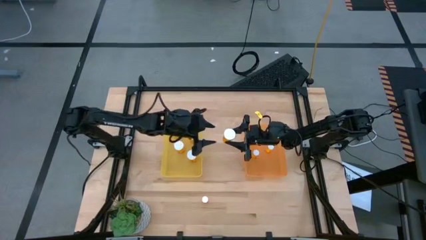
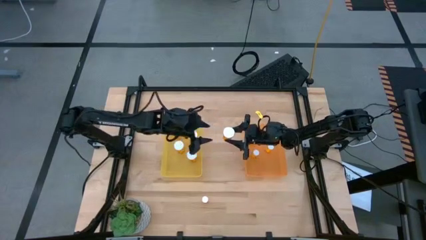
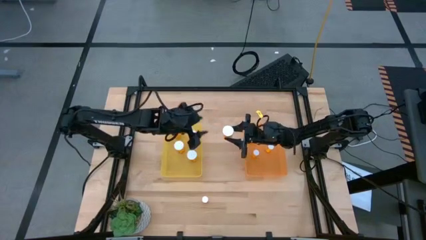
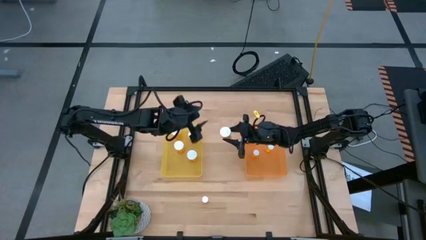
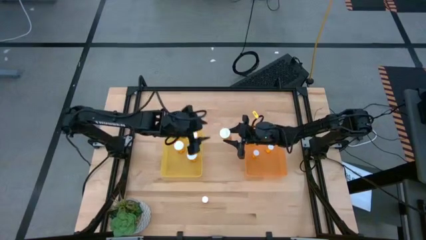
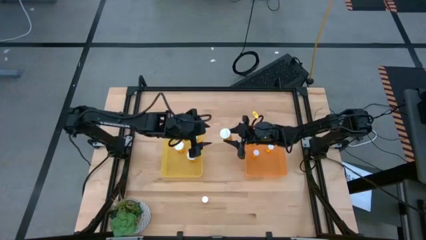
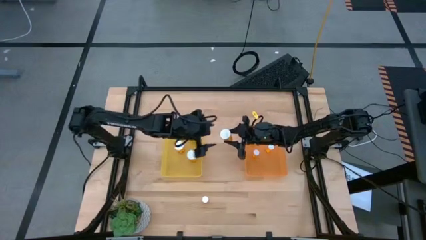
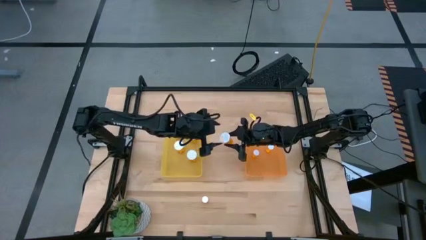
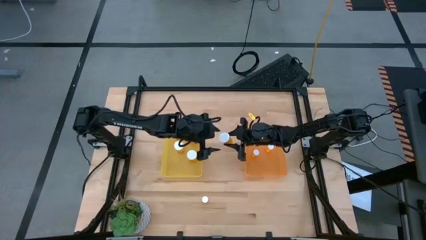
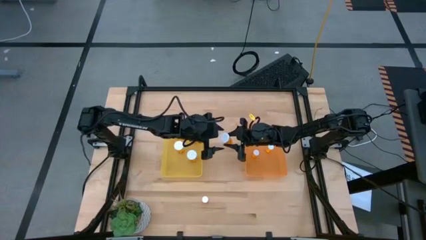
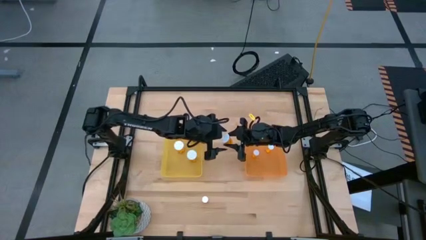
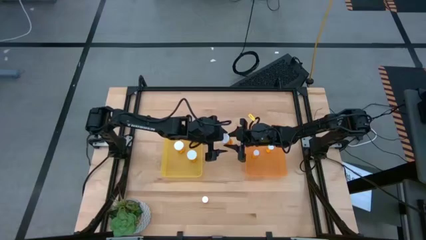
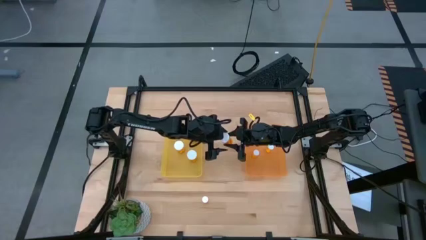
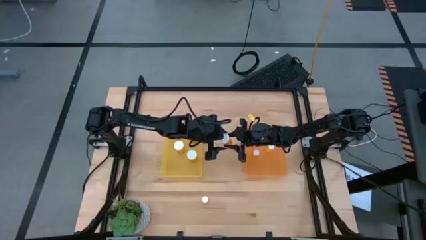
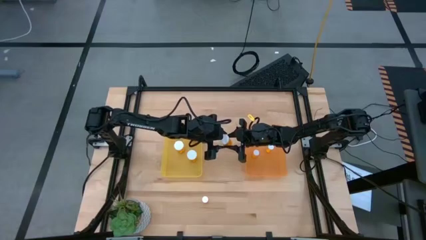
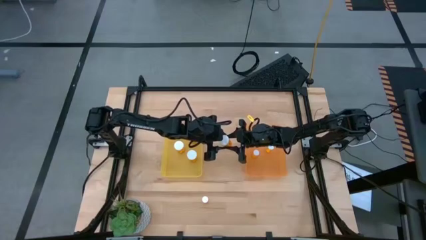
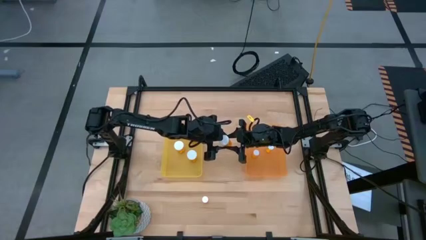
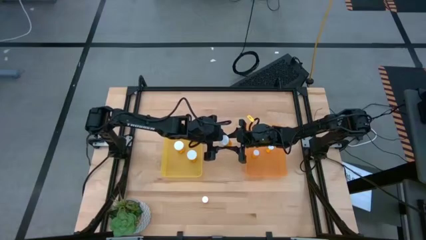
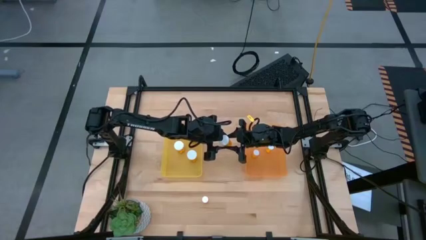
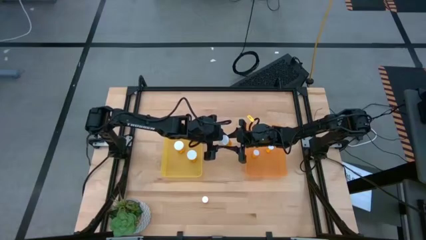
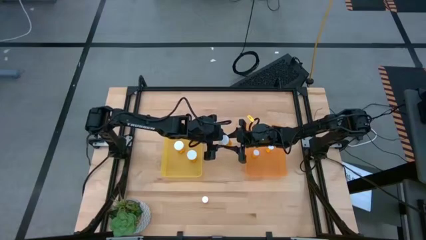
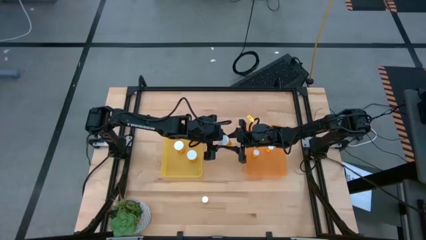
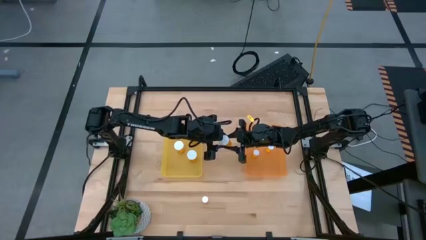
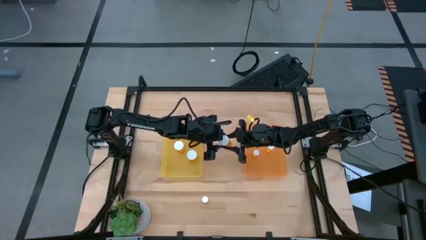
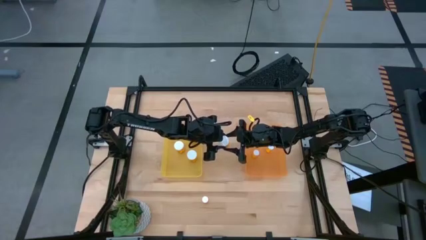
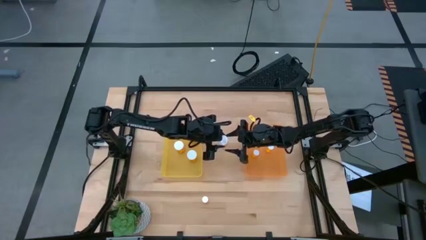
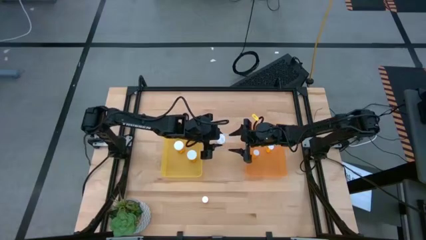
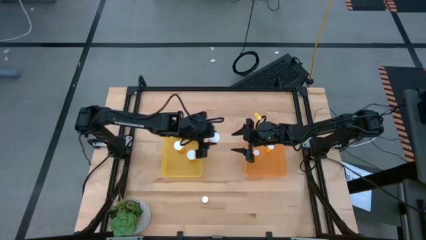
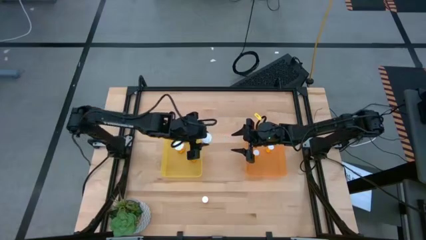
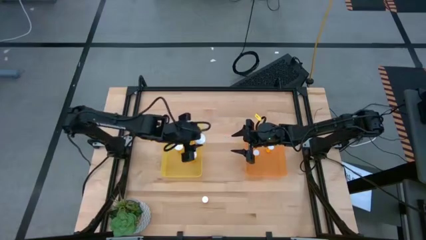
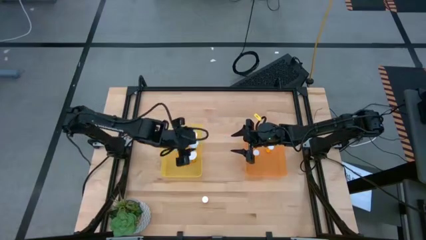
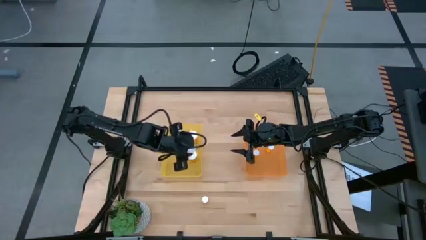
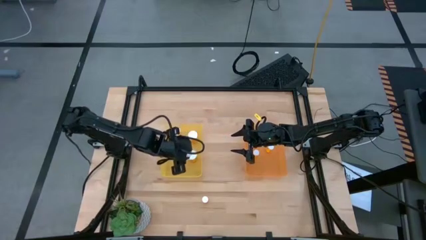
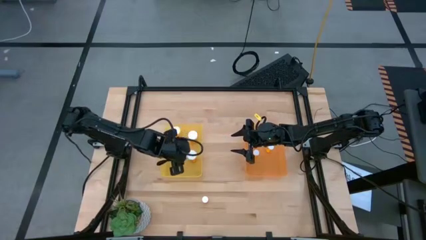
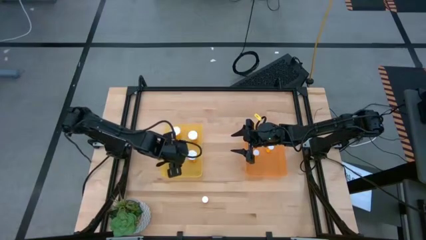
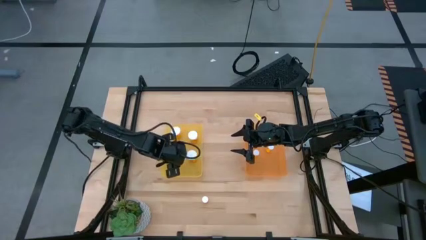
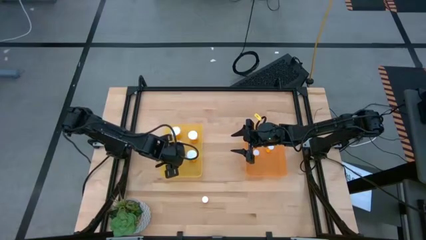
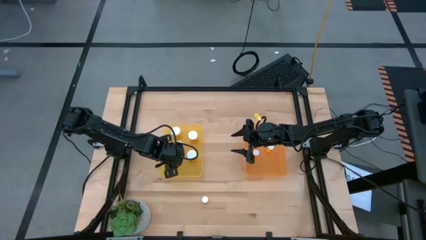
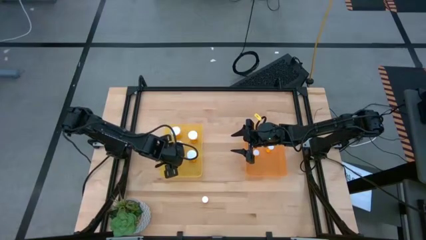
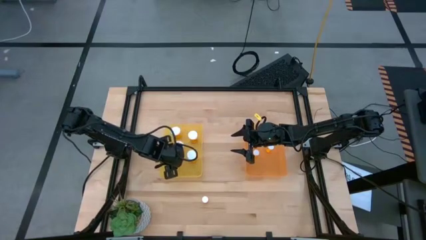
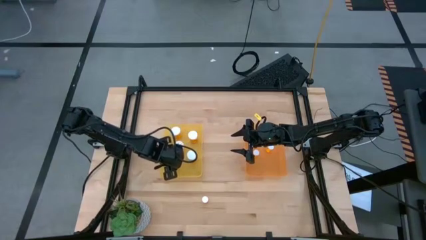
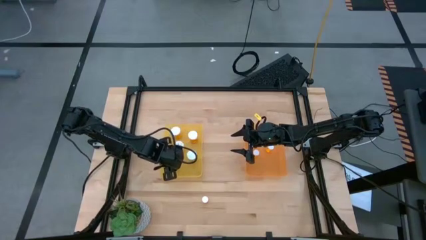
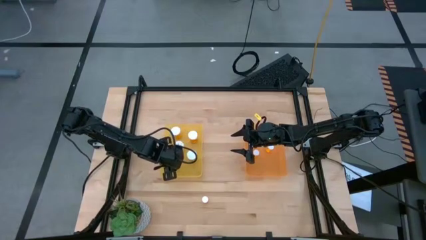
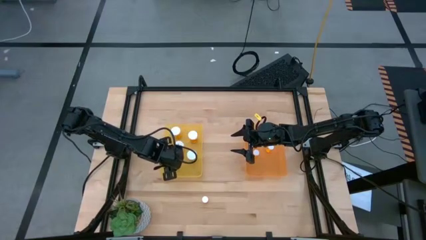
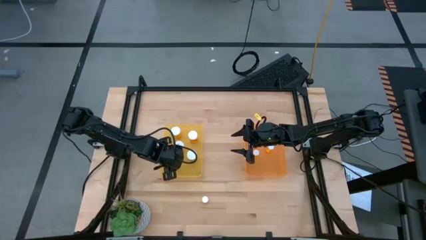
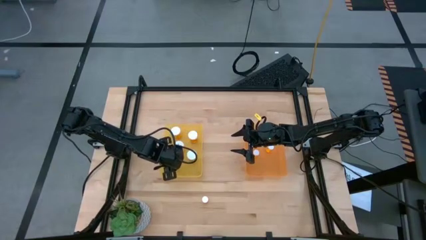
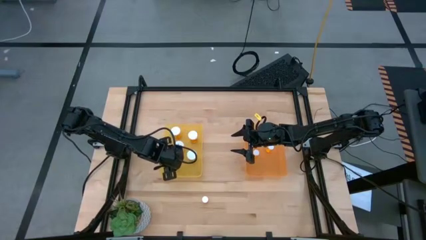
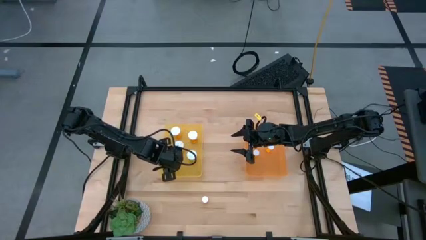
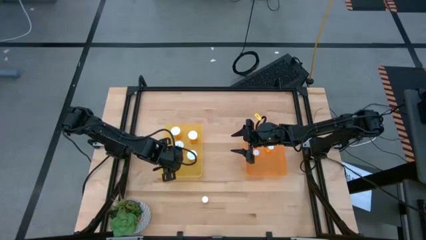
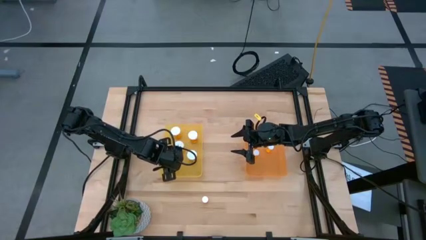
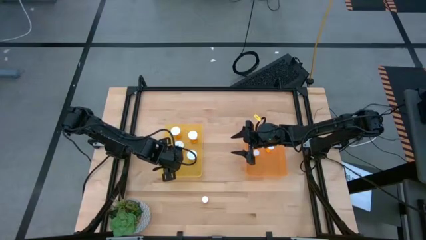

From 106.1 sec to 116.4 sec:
Task: Pick and place medicine bottles into bin by pill shape (circle, oval)
Put the large orange pill bottle into the yellow bin

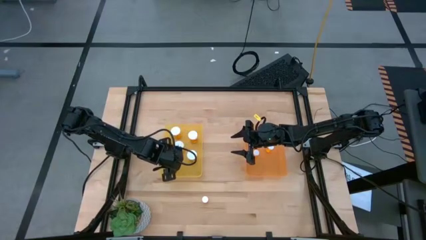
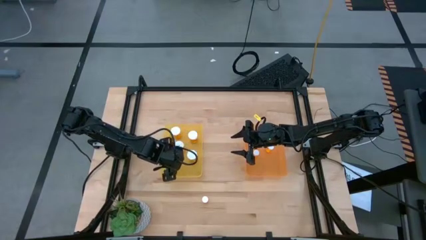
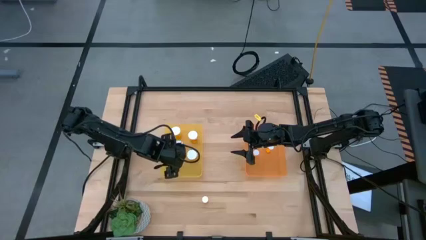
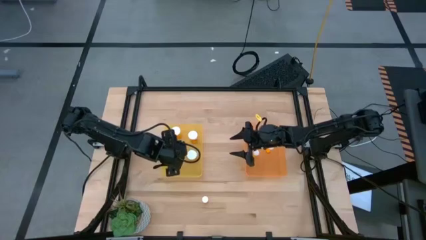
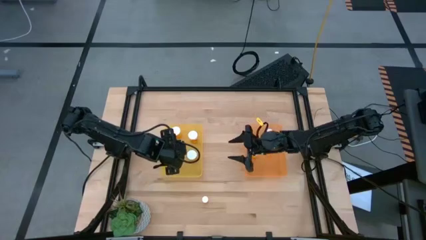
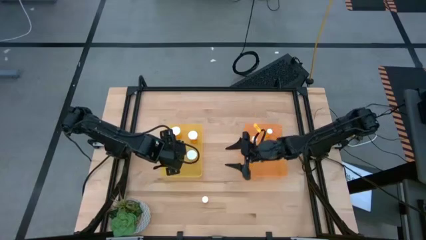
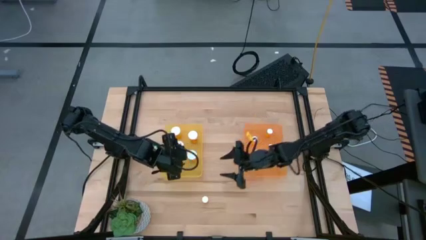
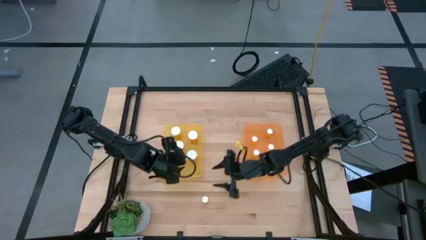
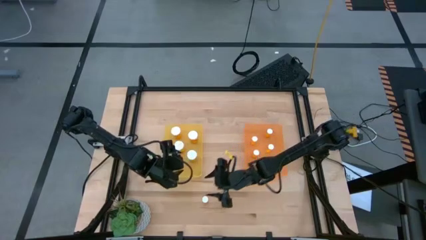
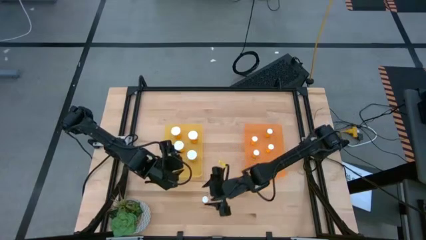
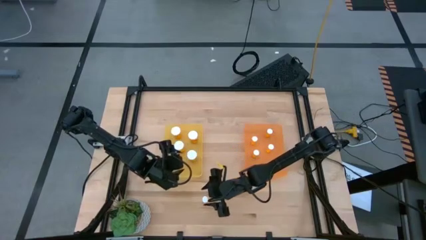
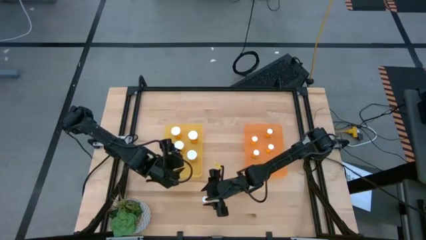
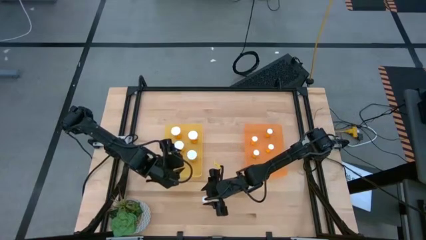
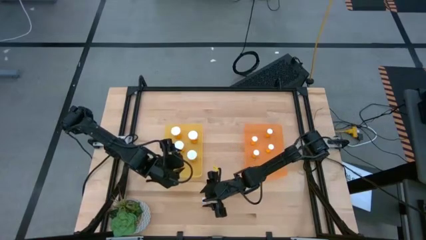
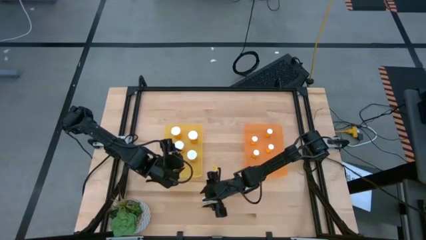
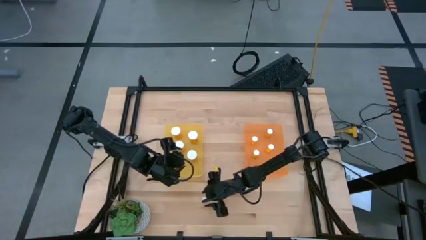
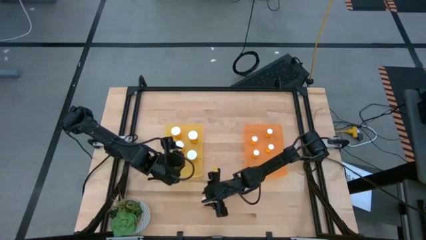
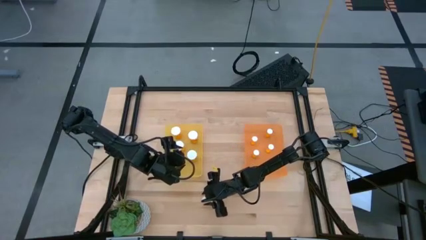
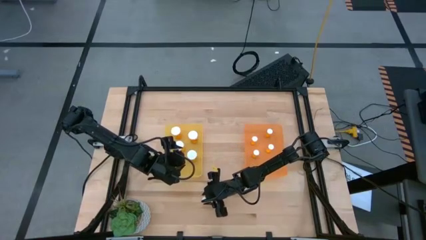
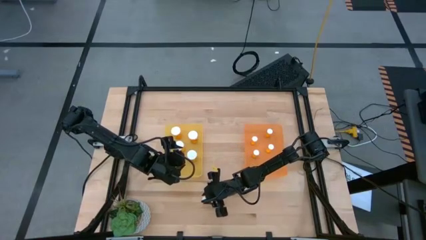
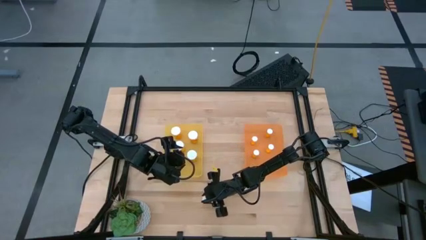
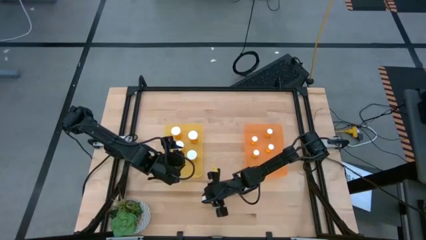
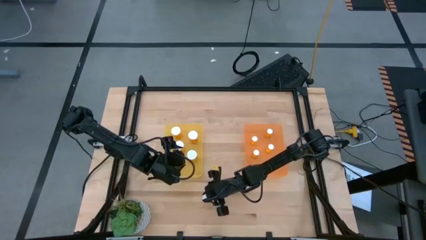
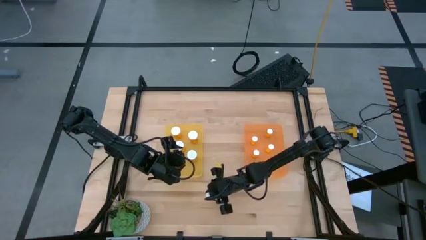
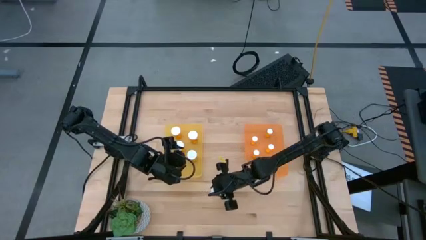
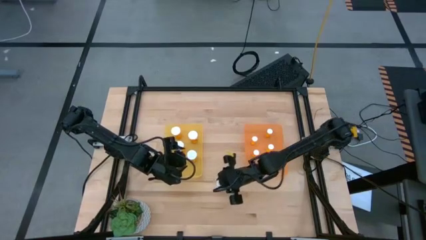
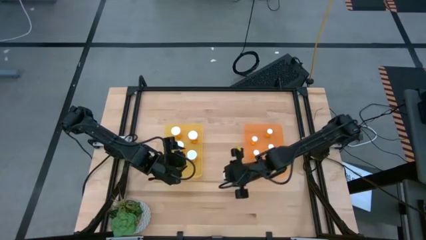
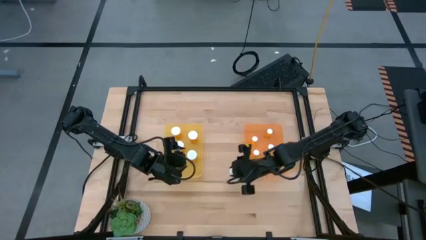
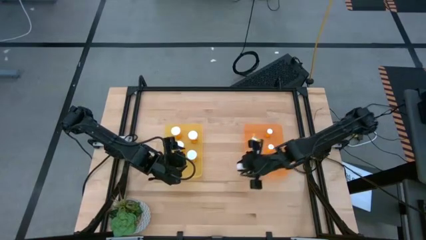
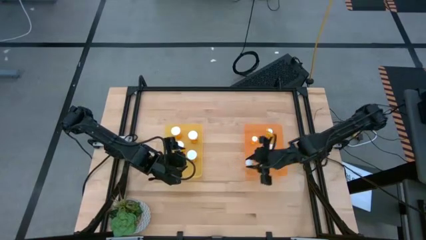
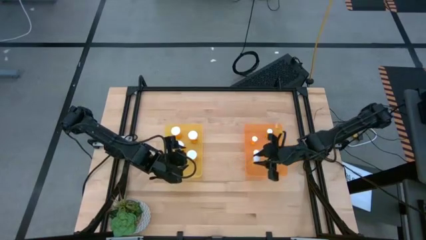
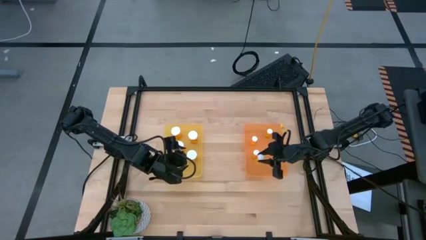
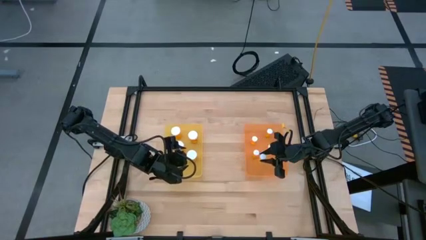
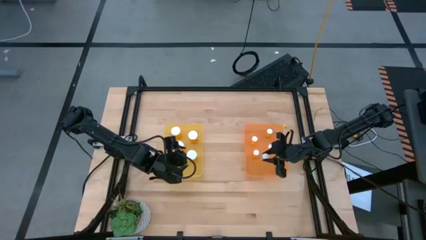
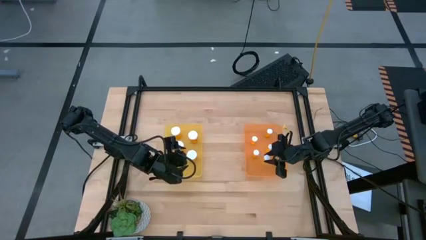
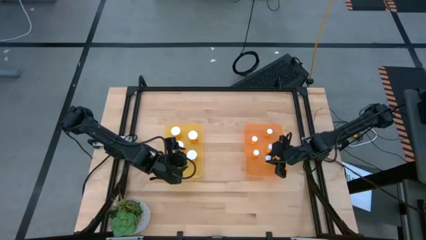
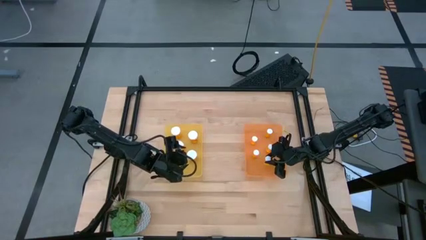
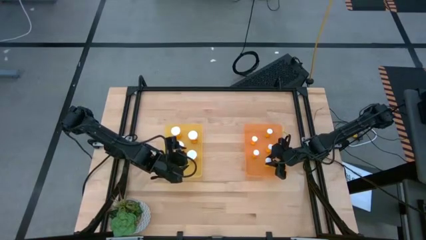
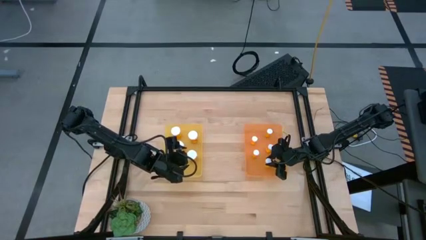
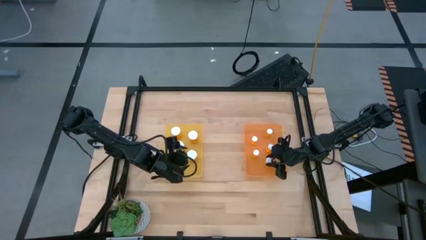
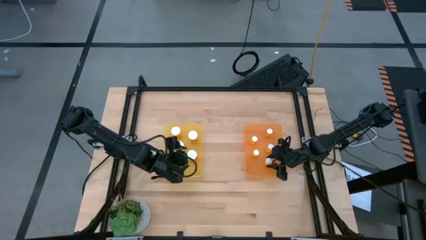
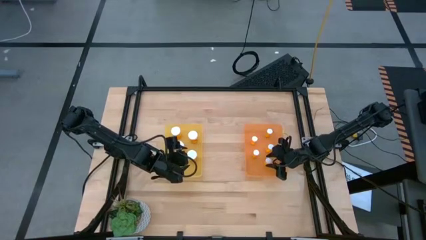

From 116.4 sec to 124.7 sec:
Put the small orange pill bottle into the orange bin
